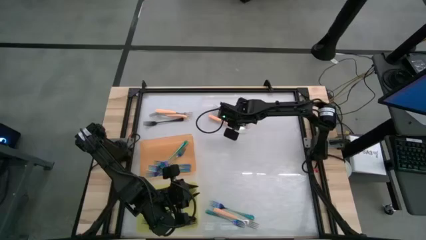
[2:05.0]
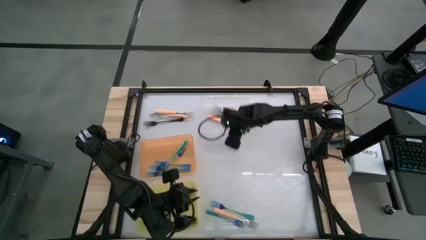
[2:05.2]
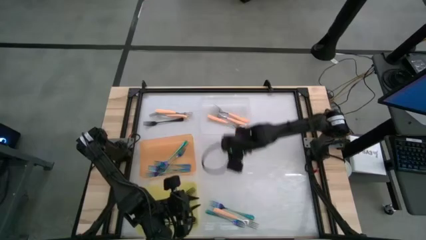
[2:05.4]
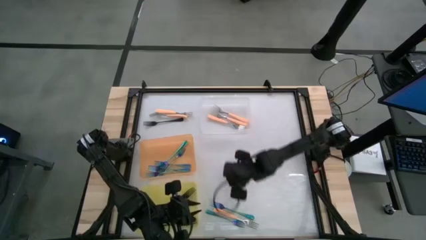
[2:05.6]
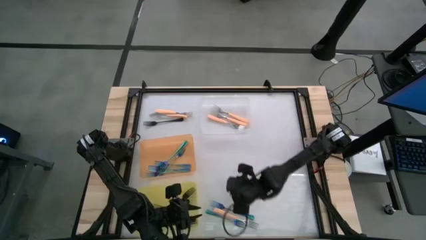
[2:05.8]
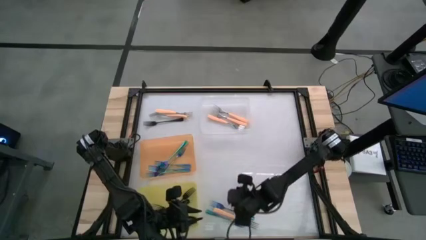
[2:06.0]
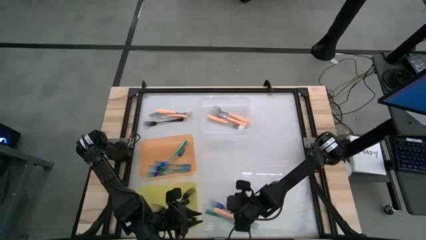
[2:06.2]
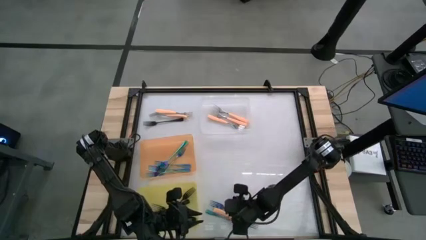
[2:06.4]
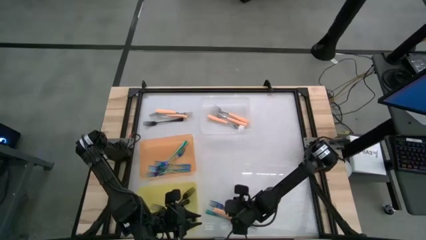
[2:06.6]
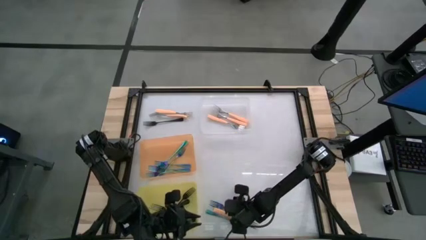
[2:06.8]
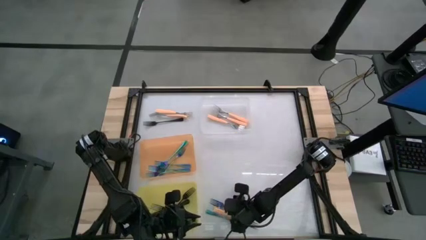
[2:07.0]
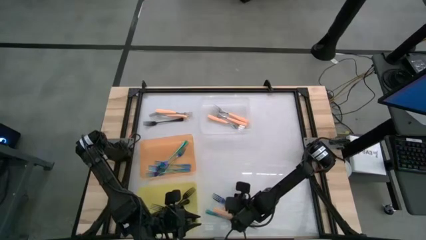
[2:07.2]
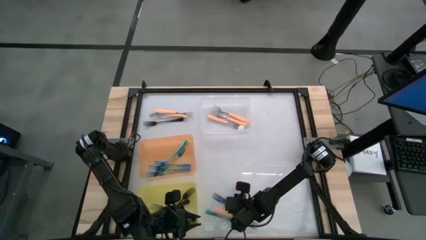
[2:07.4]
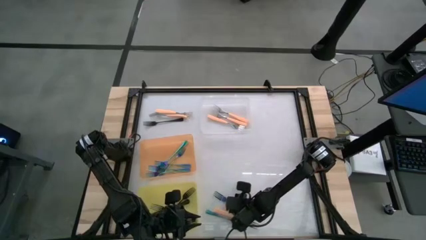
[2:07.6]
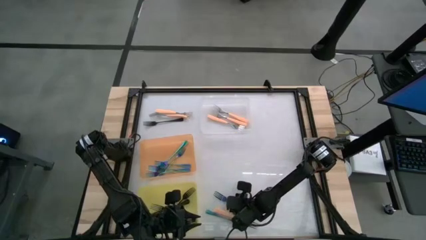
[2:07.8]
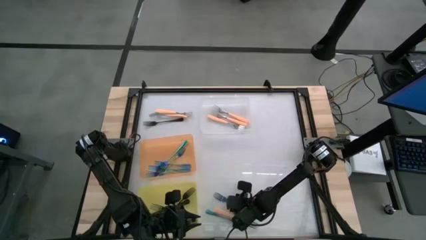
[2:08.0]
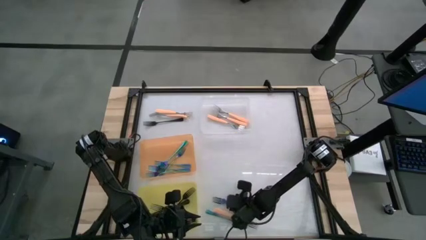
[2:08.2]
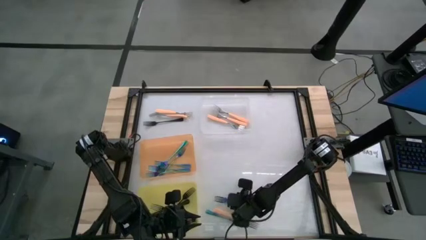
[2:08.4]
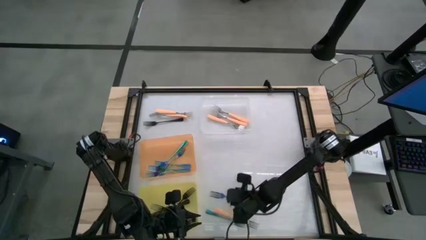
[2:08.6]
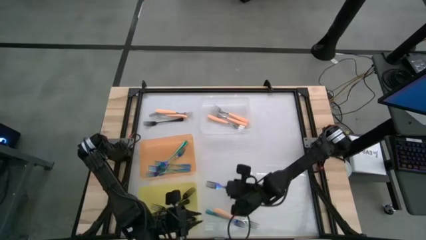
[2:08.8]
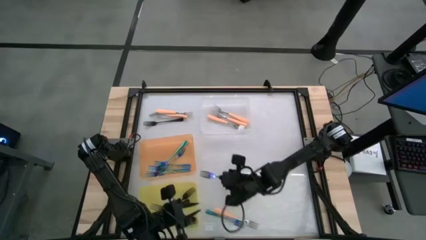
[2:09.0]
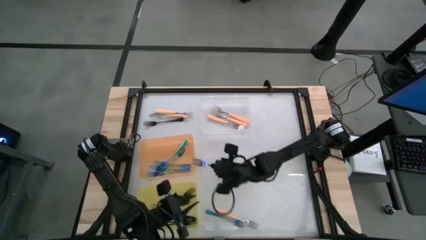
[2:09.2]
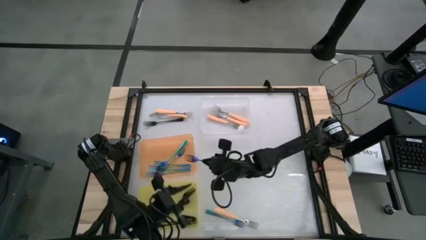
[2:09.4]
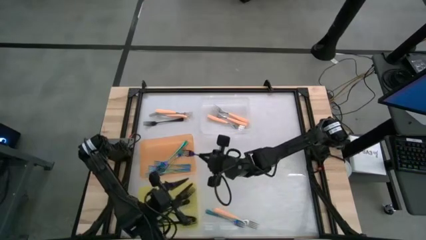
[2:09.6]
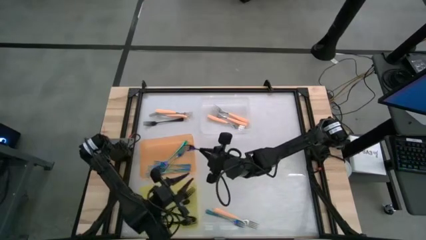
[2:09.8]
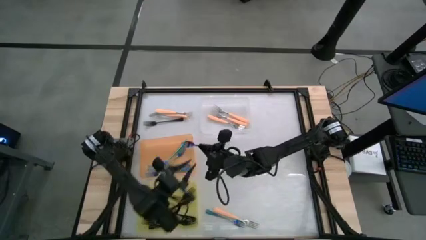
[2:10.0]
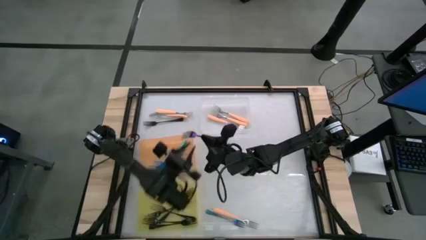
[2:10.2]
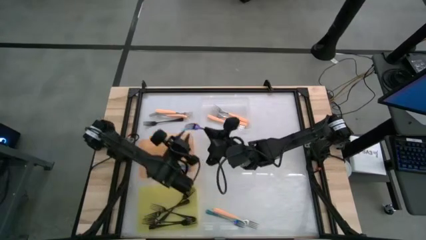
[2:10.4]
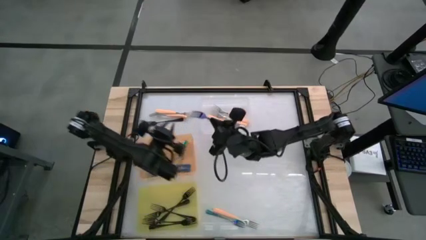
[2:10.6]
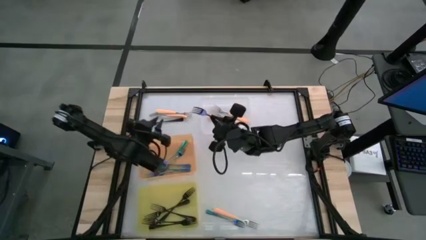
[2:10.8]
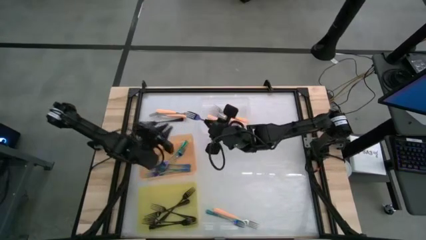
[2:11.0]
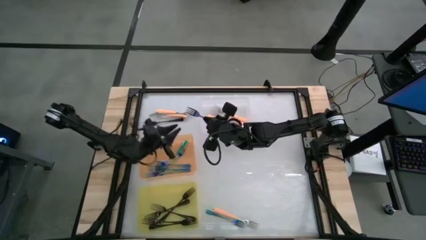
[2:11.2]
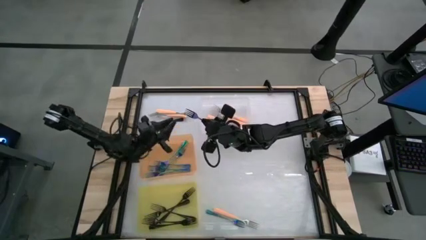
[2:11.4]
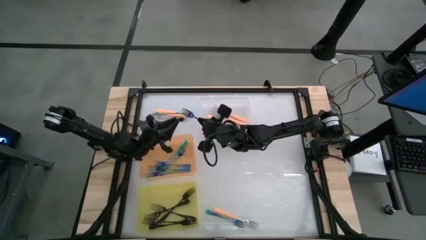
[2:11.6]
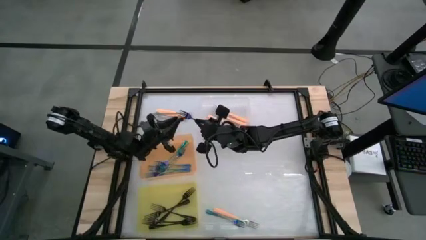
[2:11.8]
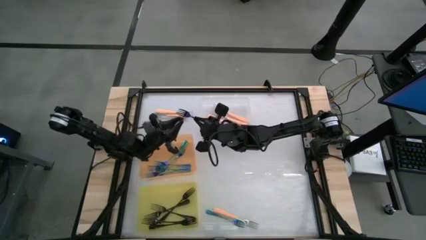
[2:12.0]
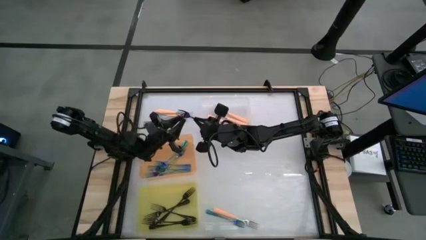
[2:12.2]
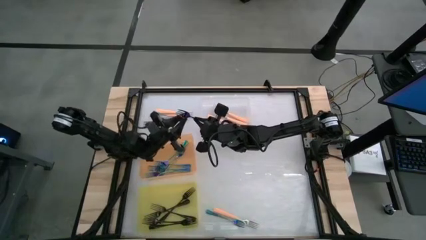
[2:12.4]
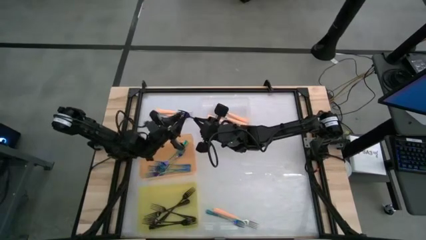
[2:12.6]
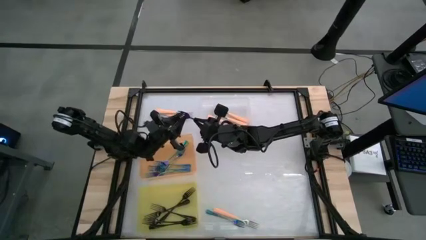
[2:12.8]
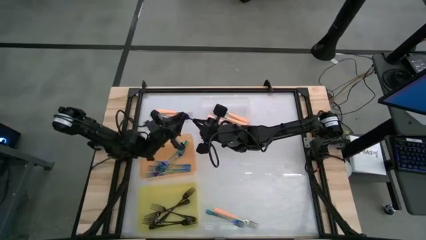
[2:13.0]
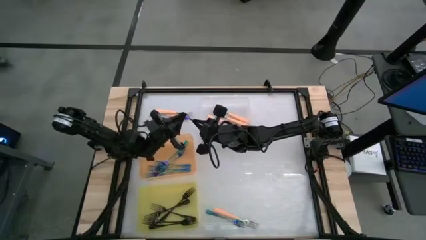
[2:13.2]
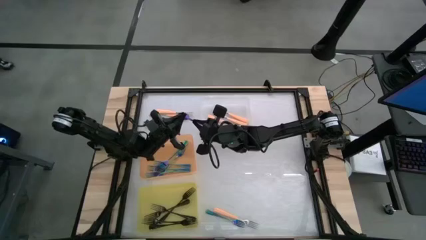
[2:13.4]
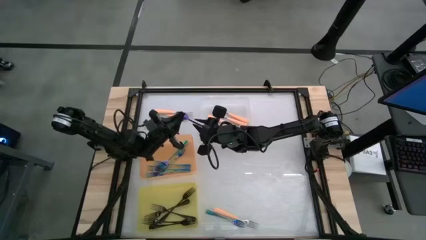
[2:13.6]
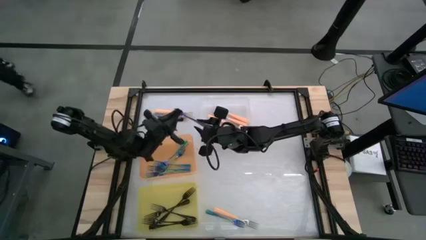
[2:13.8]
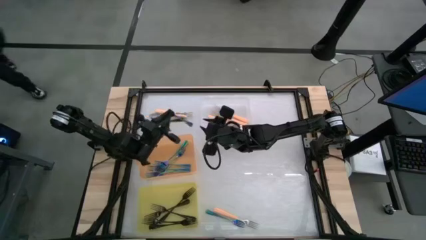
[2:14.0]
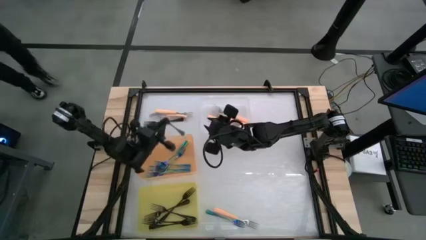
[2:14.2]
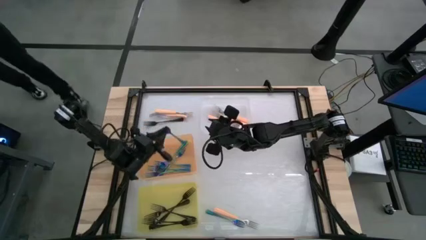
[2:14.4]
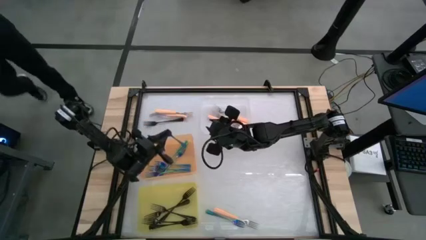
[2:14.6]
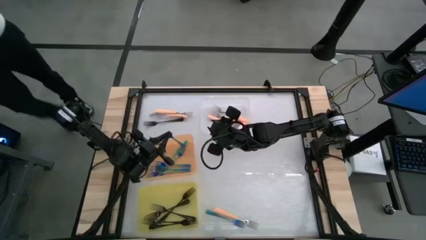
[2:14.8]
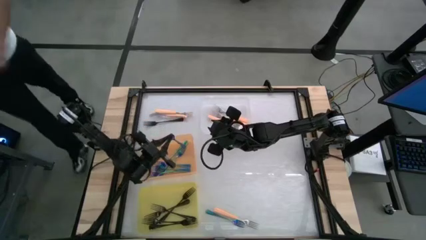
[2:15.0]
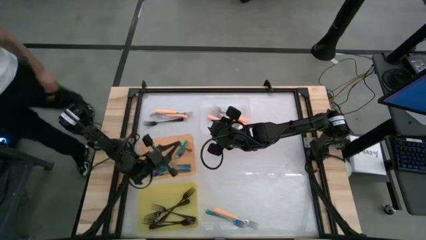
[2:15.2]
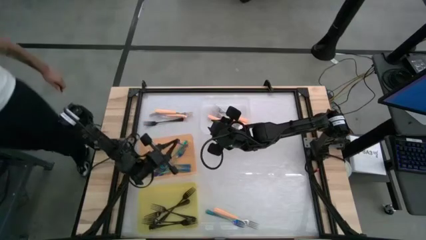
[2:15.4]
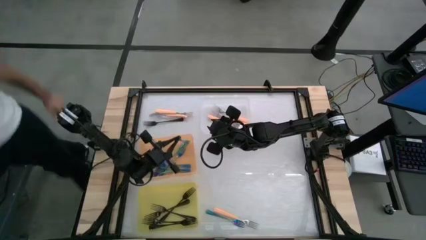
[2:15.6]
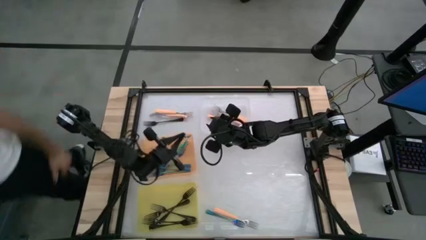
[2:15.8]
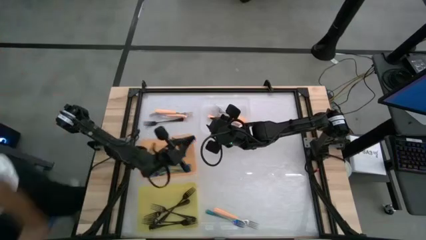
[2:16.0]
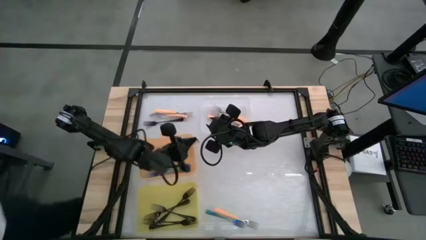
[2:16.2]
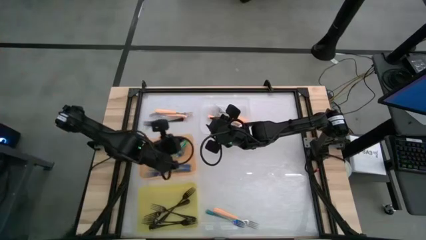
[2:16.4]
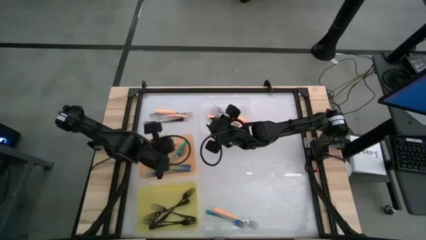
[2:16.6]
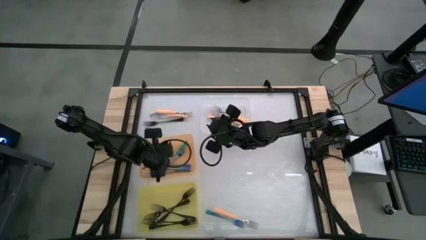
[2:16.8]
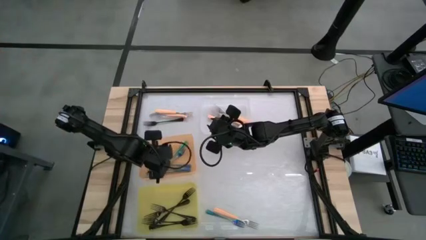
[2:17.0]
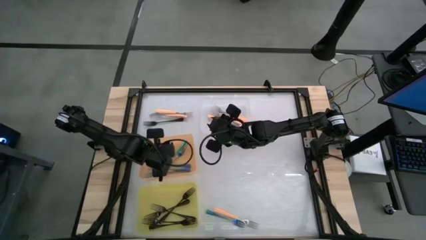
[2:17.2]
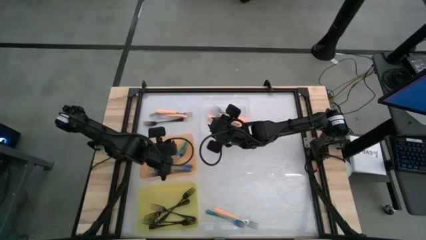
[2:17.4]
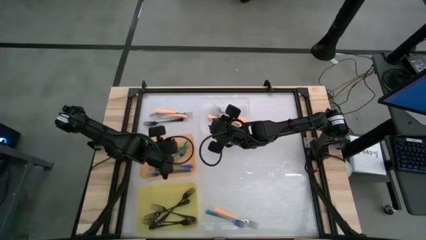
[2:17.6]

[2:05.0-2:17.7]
Task: Sort silverware by color (type)
Put the blue fork into the orange bin

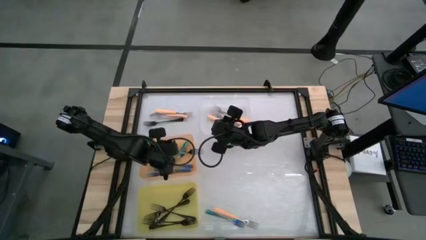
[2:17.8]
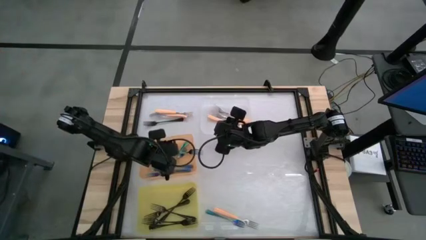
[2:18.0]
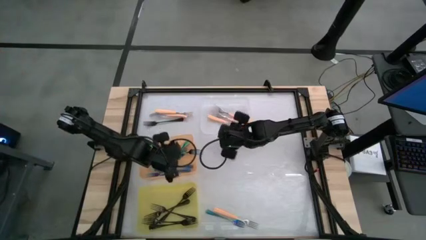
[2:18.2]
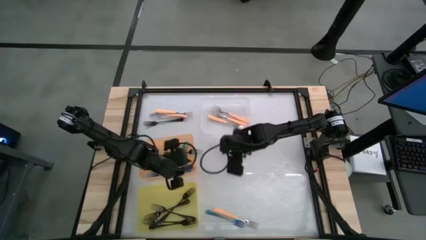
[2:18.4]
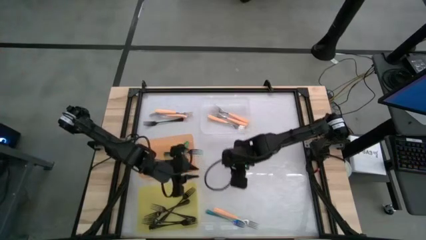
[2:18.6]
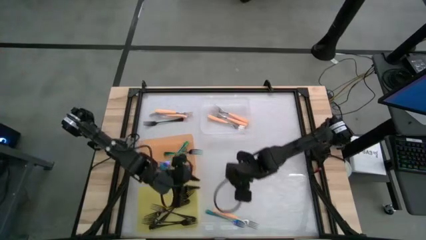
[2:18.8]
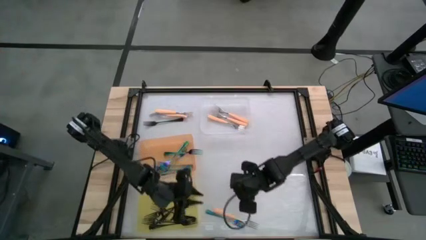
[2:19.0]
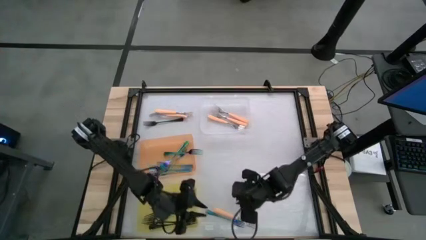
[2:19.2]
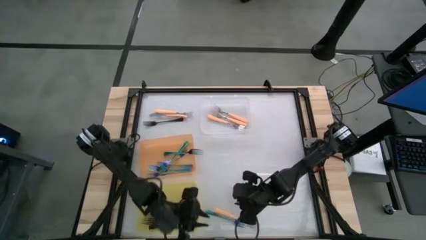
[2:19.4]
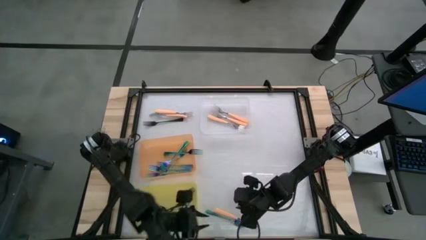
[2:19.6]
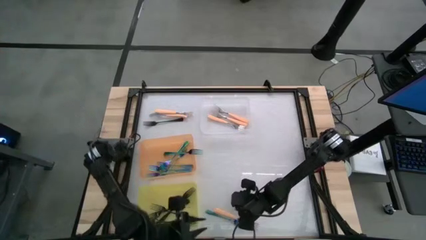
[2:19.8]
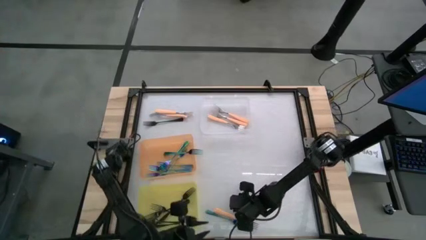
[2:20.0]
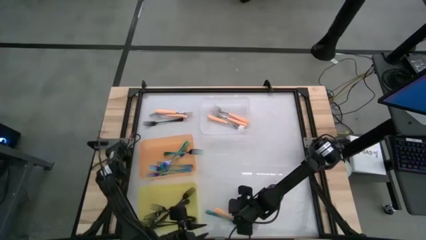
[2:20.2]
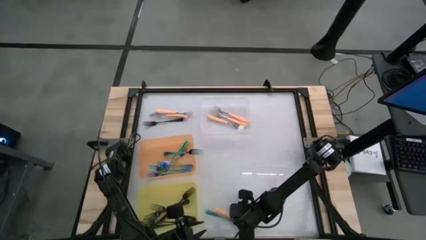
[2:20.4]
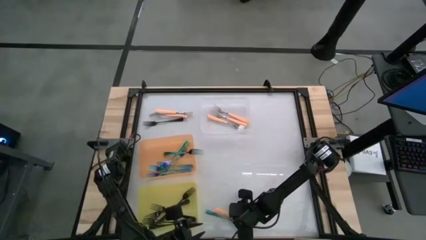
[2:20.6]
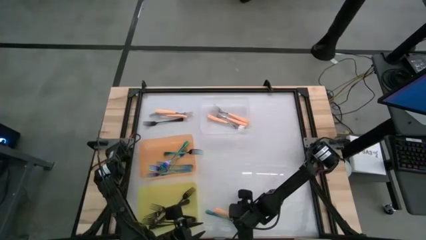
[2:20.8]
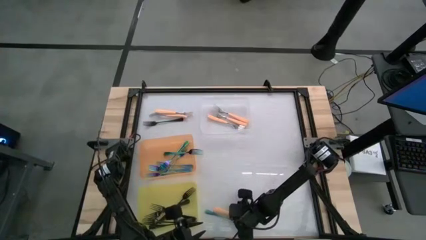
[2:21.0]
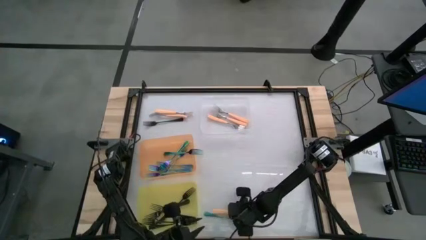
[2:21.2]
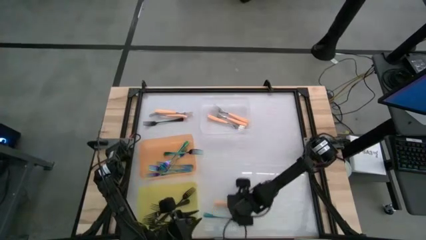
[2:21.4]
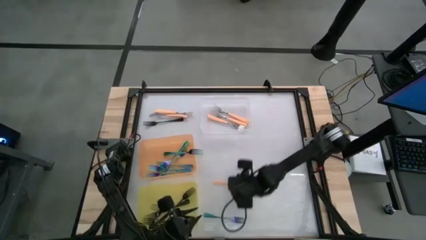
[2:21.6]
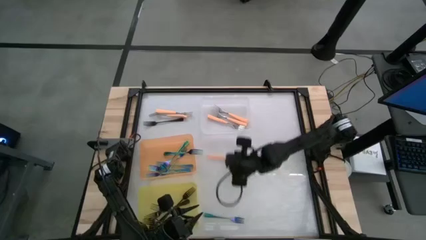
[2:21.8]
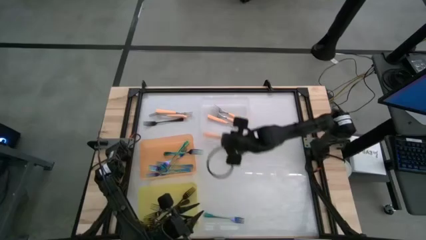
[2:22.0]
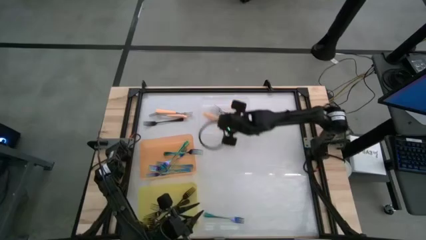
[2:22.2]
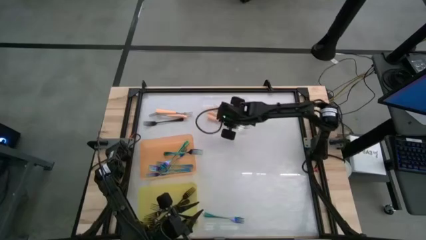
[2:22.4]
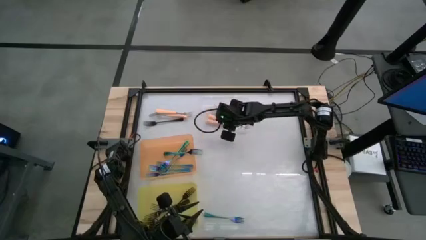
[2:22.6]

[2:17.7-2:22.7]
Put the orange fork into the transparent bin
